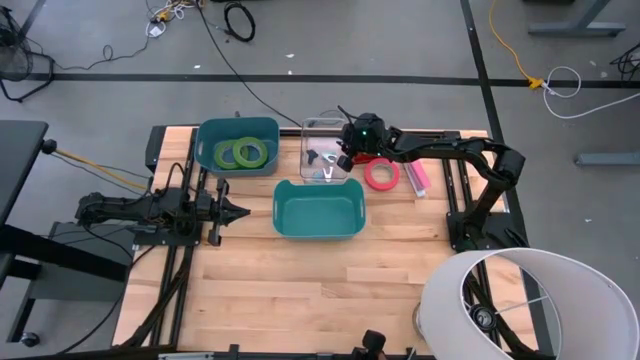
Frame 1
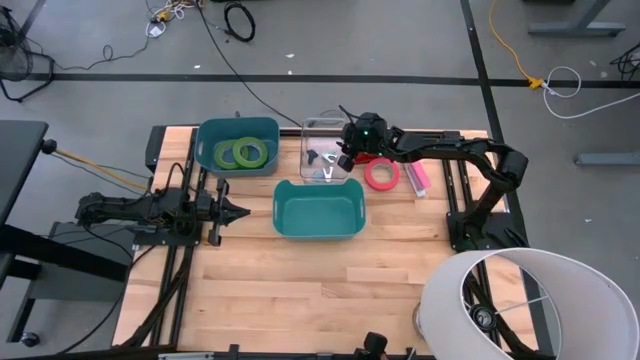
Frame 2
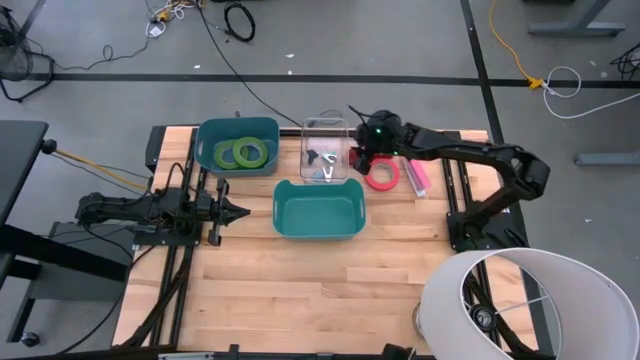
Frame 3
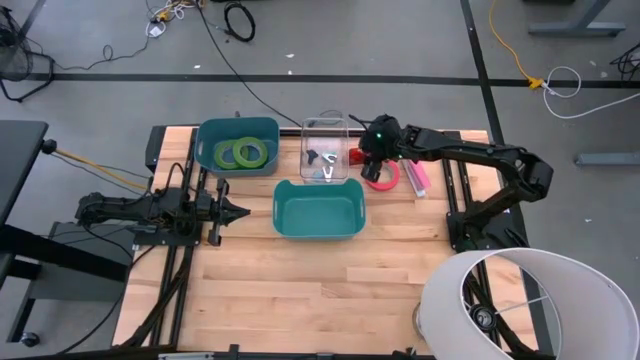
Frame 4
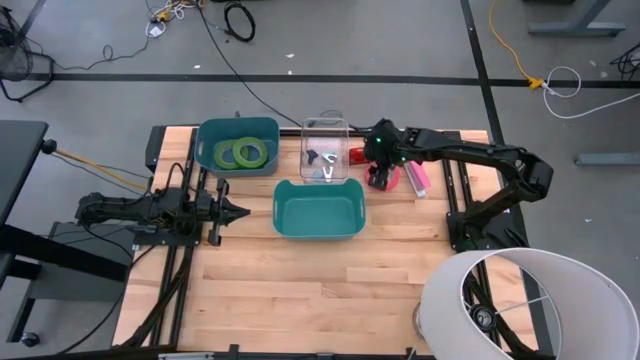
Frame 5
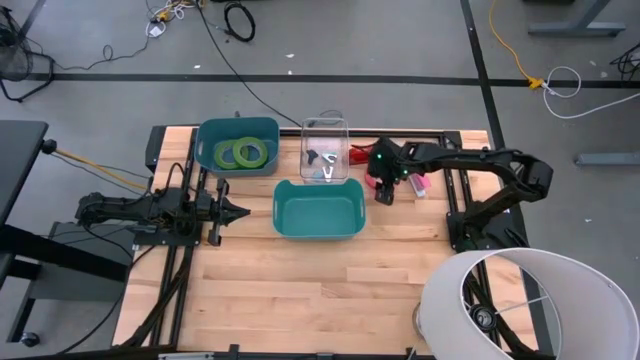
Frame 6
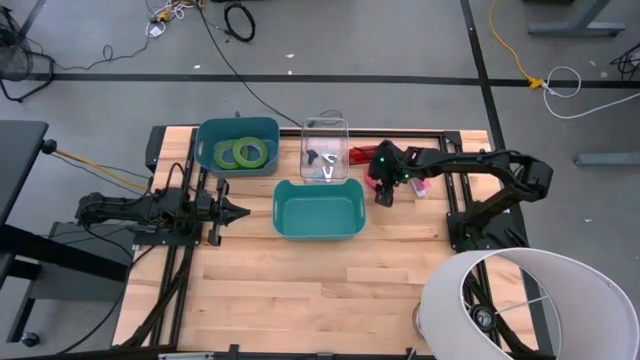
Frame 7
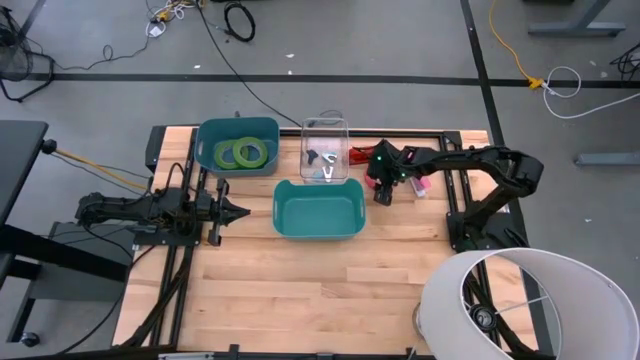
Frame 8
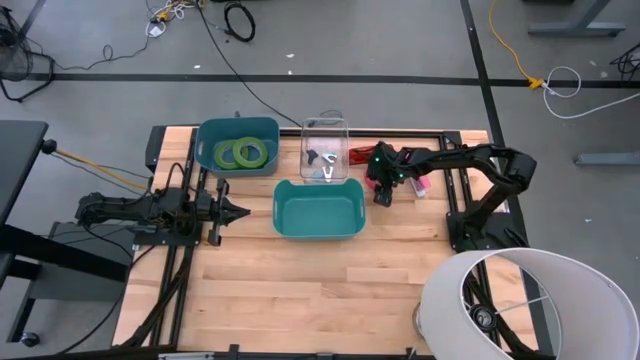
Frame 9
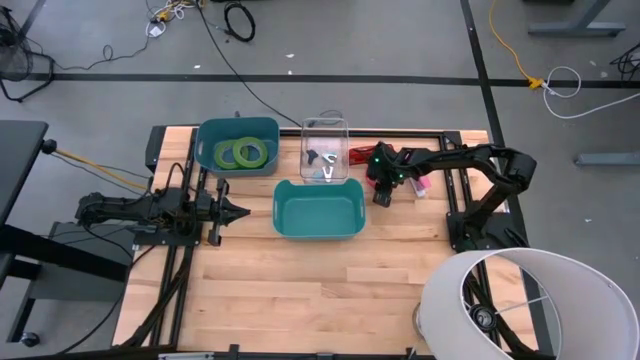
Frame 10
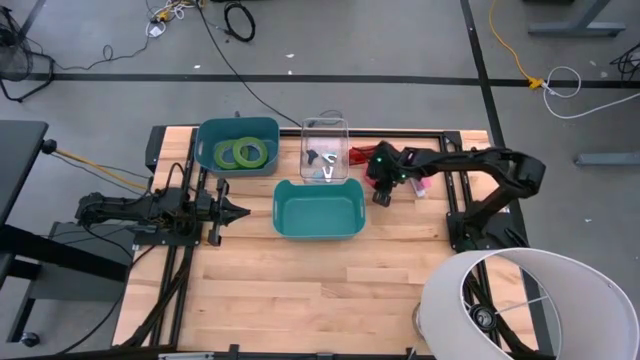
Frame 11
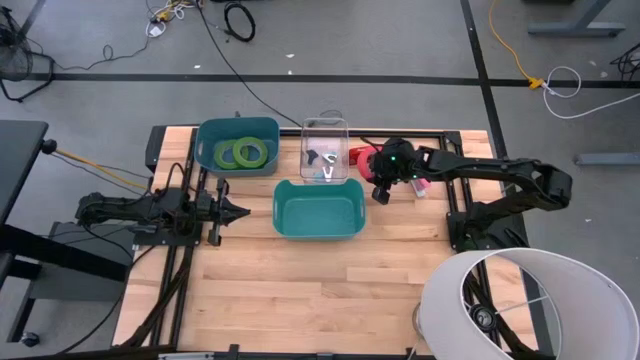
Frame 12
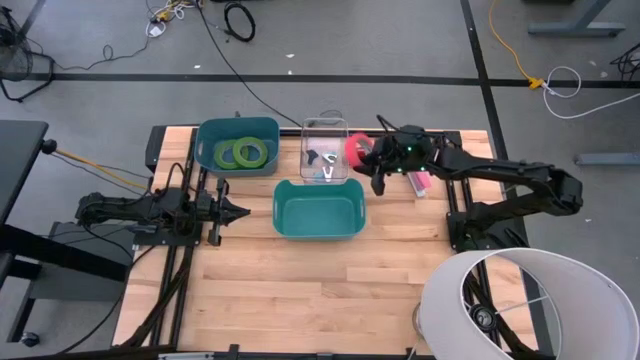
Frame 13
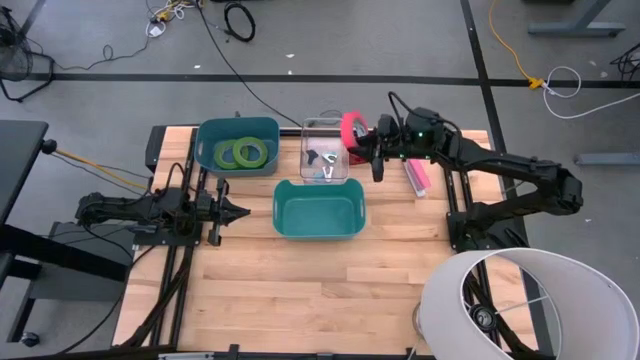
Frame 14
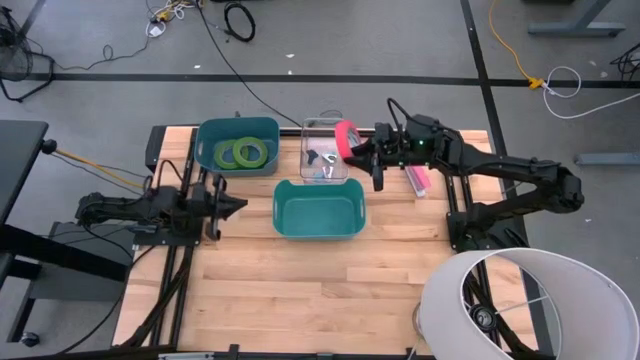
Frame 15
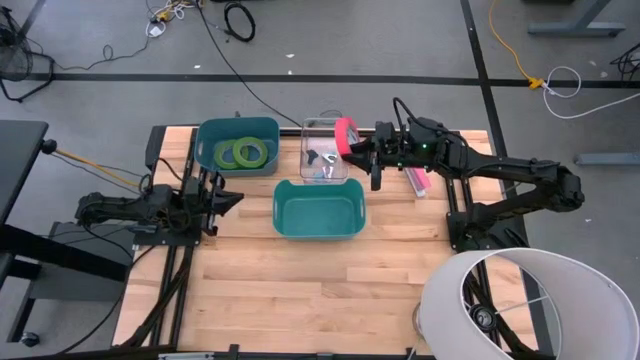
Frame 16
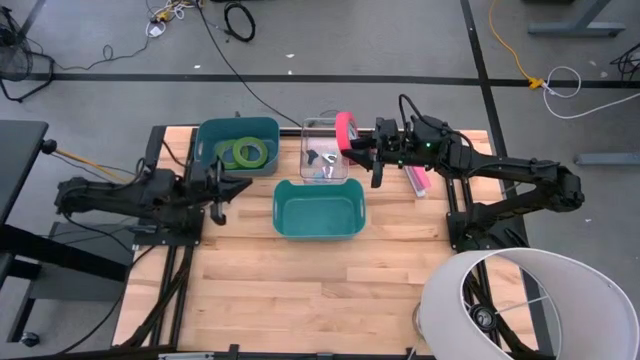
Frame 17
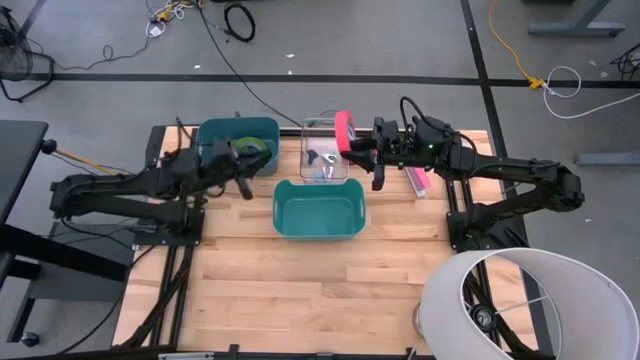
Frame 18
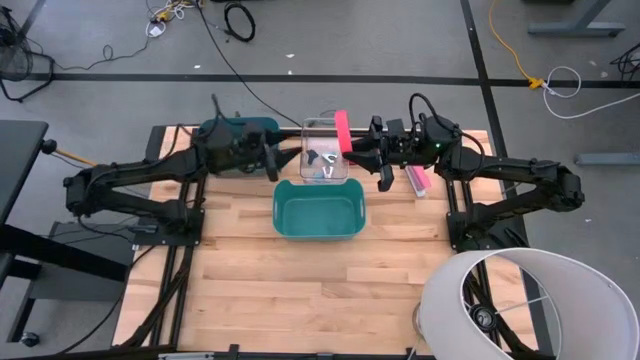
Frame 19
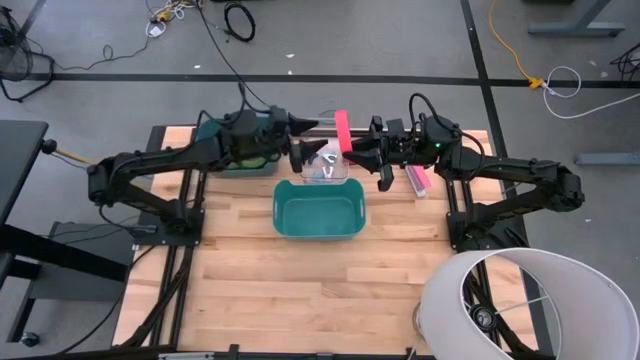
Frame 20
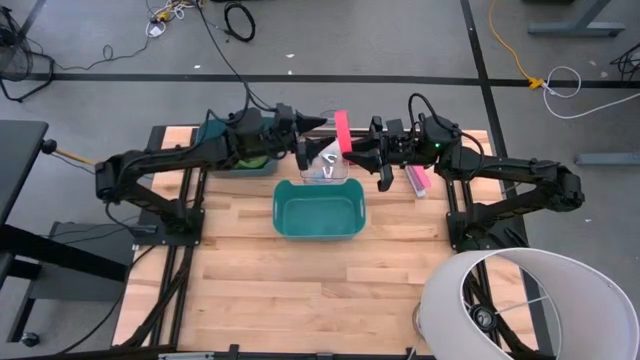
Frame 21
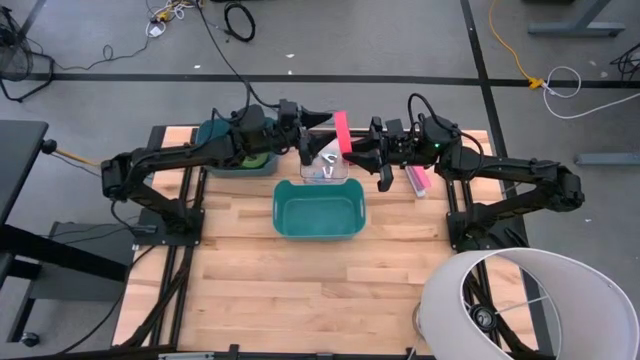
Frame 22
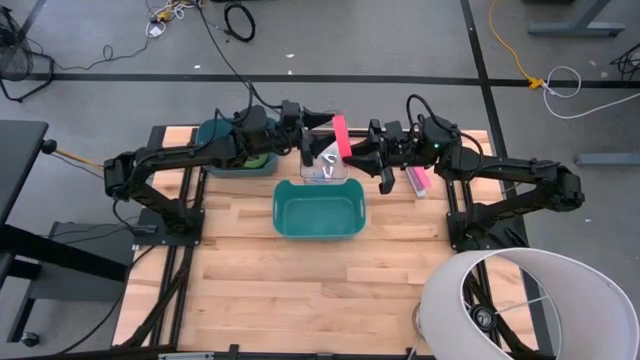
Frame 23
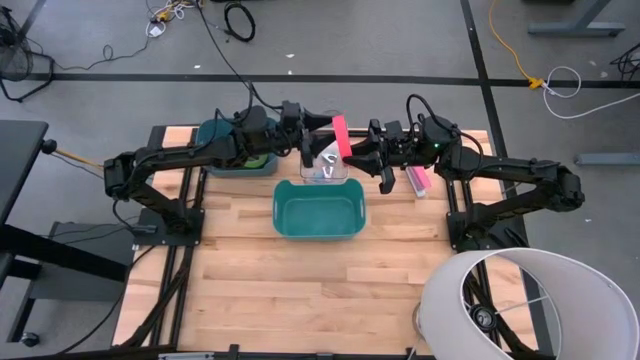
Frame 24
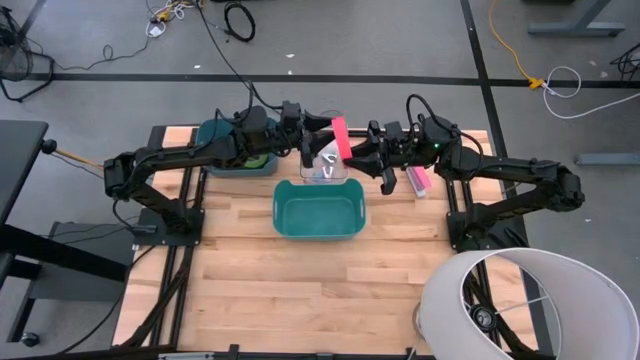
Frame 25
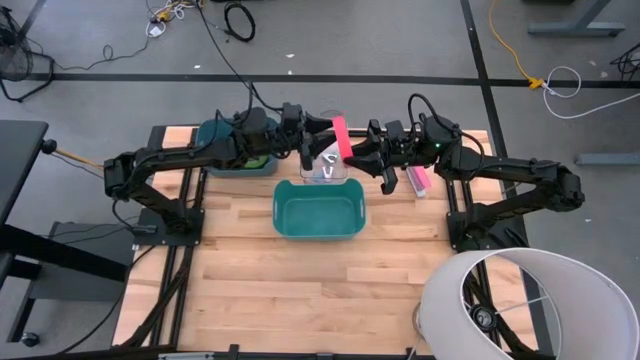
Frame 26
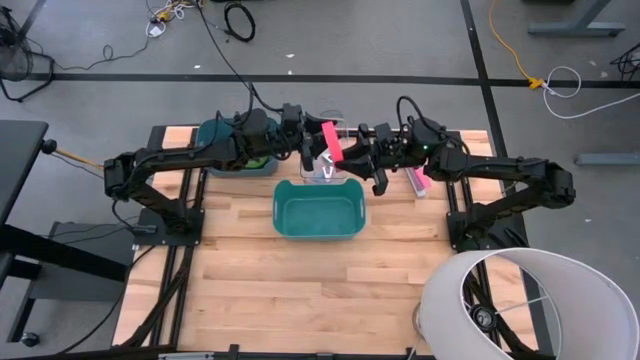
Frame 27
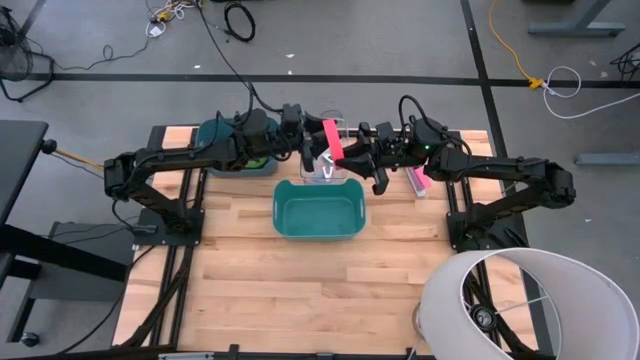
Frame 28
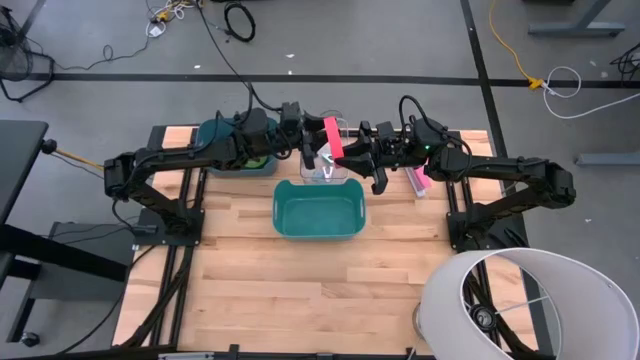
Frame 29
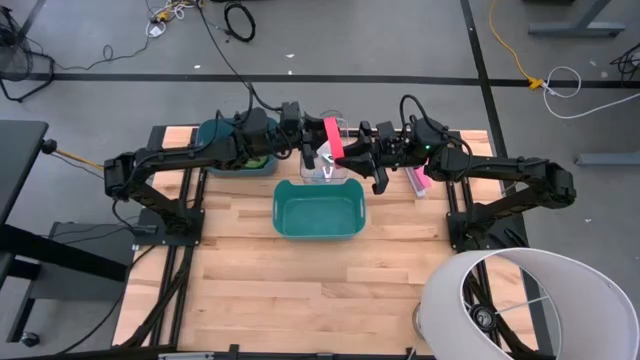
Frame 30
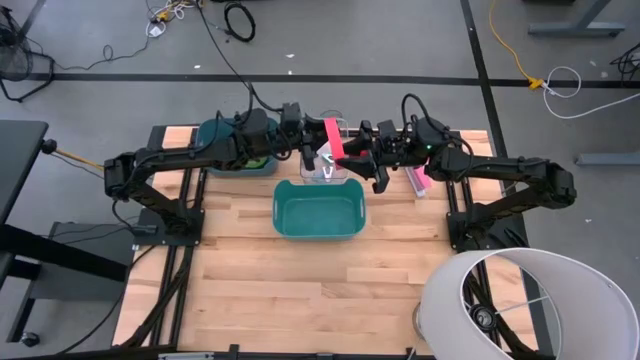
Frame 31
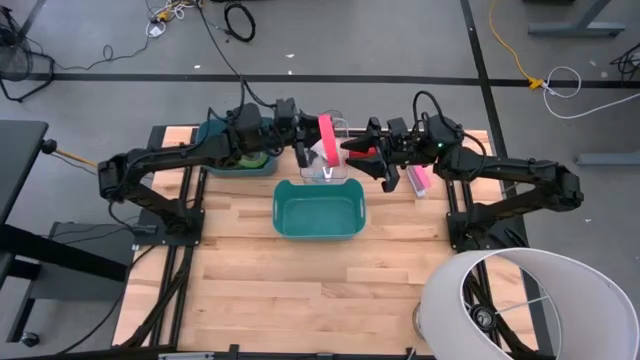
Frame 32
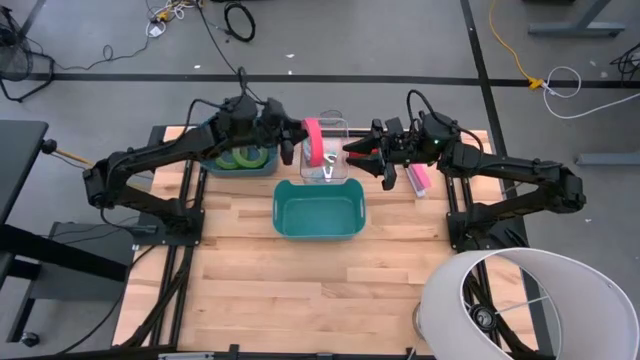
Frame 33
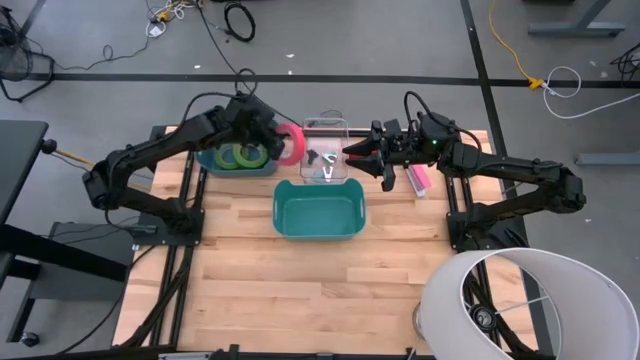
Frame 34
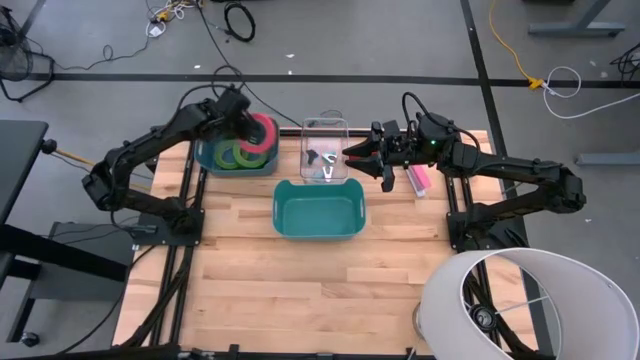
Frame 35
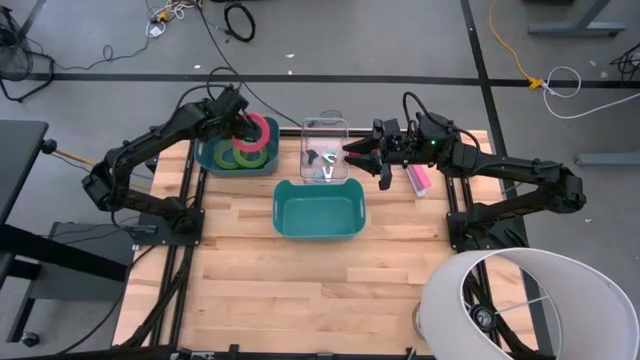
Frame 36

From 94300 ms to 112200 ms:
Task: Pick and place Stapler, Stapler remover, tape
Put the pink tape into the blue bin

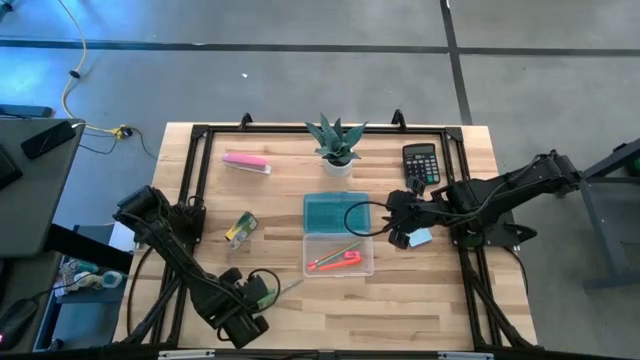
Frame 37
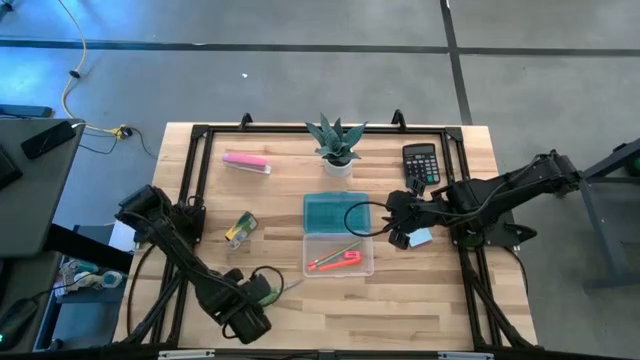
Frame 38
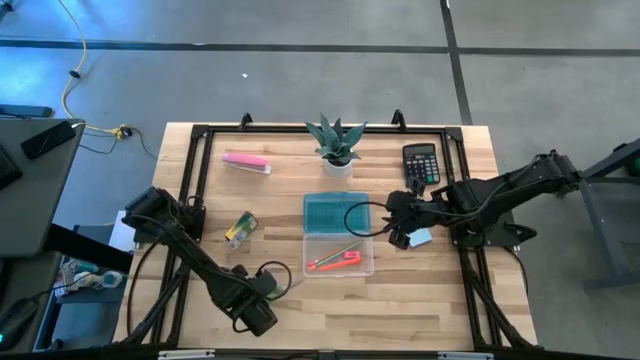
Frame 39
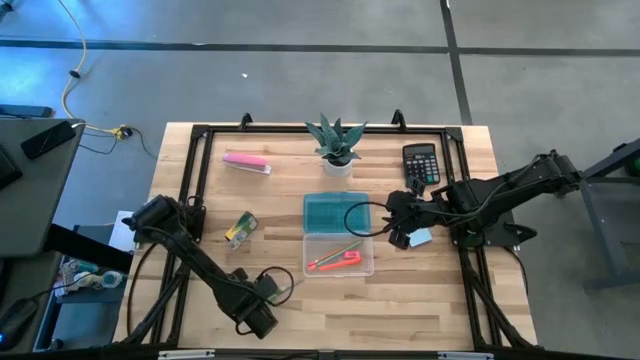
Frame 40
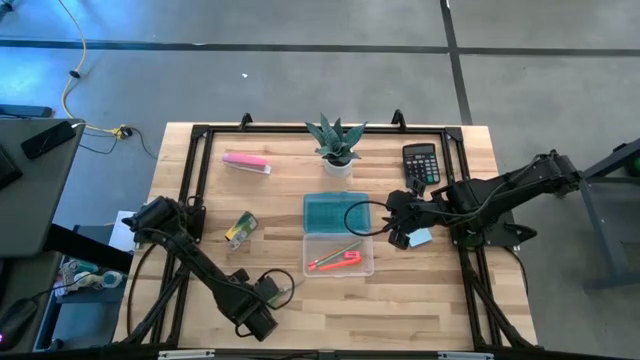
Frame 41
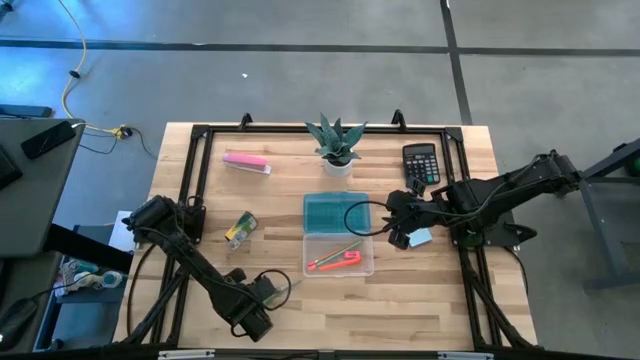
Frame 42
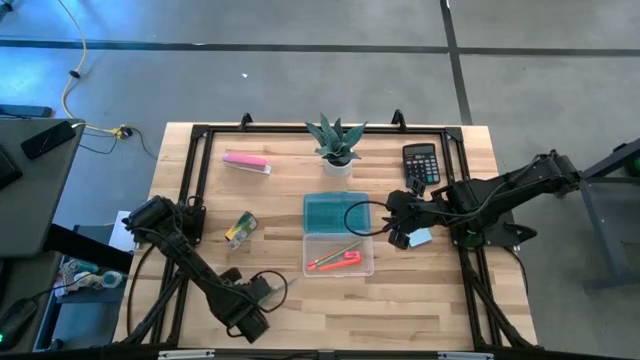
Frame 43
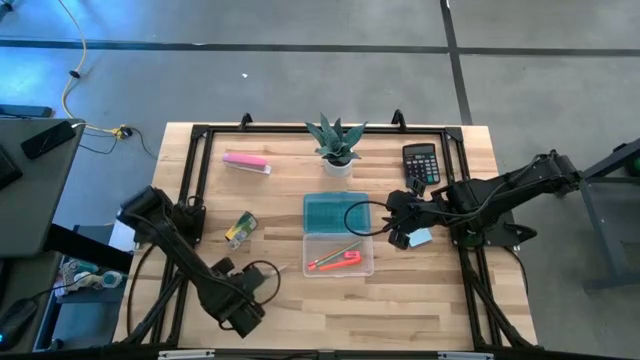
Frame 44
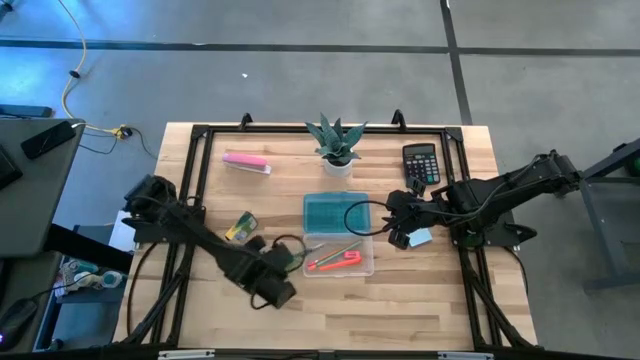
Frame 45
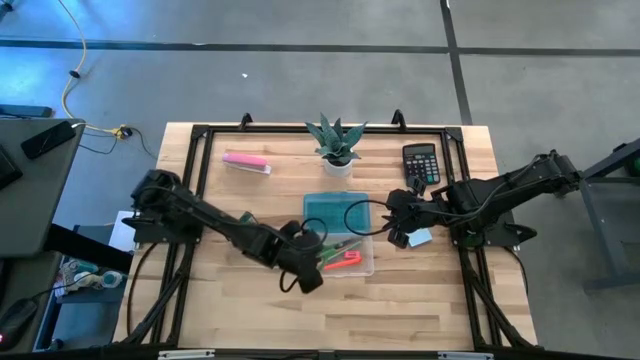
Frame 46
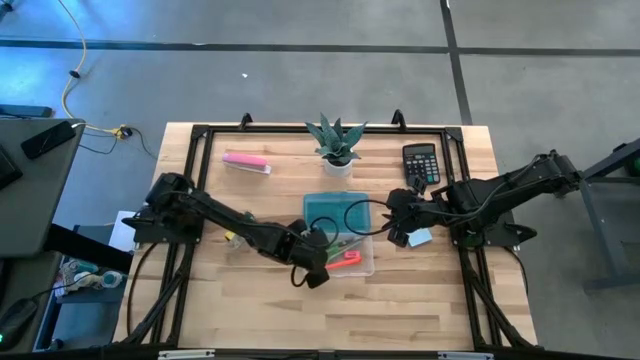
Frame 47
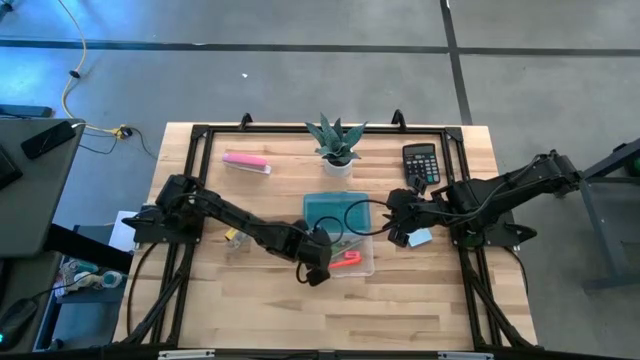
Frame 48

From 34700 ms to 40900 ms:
Task: Pack school essentials
Put the green scissors into the blue supply box
